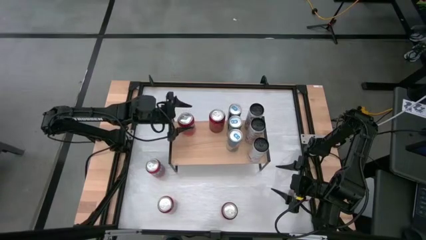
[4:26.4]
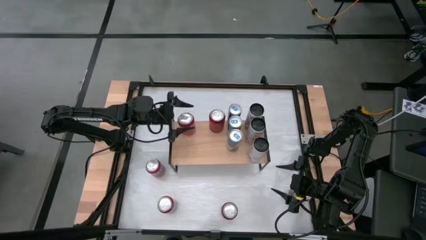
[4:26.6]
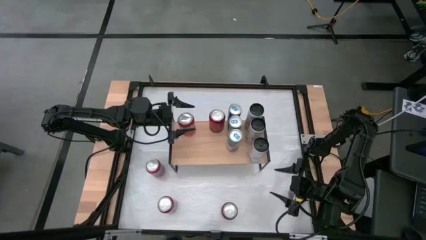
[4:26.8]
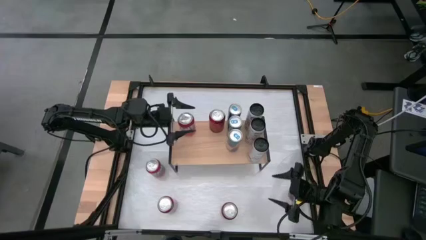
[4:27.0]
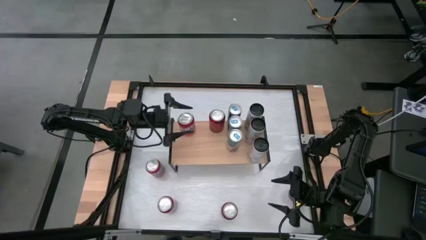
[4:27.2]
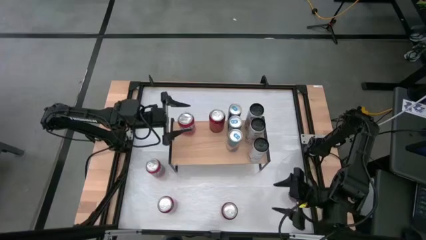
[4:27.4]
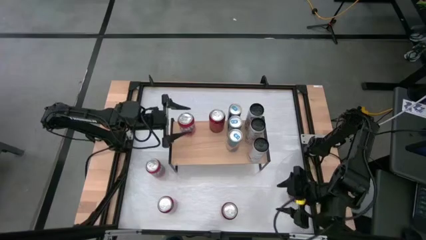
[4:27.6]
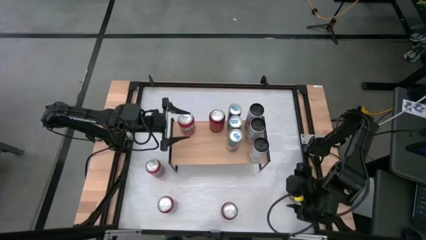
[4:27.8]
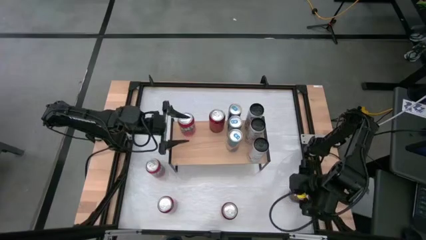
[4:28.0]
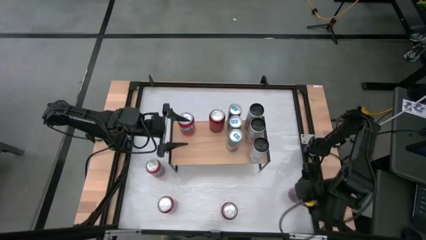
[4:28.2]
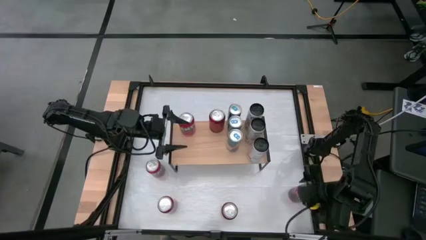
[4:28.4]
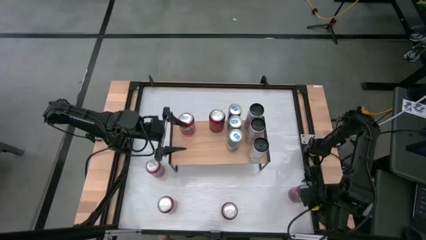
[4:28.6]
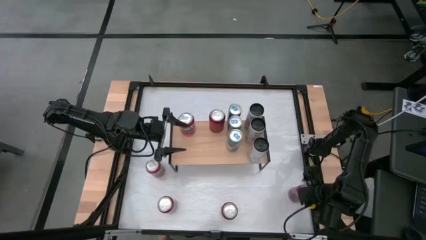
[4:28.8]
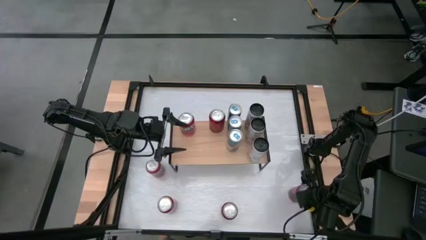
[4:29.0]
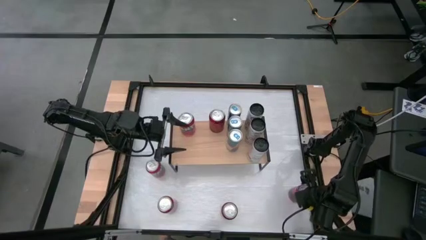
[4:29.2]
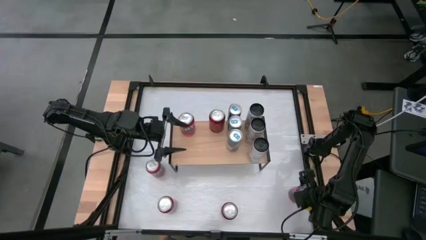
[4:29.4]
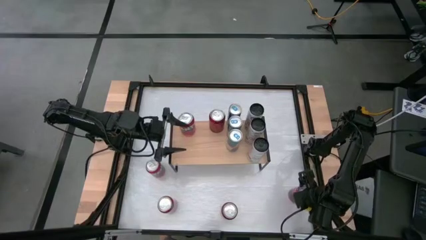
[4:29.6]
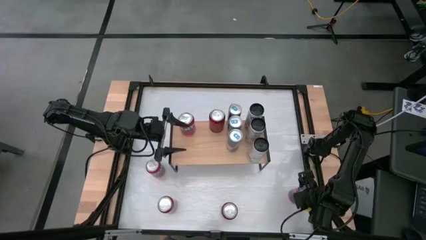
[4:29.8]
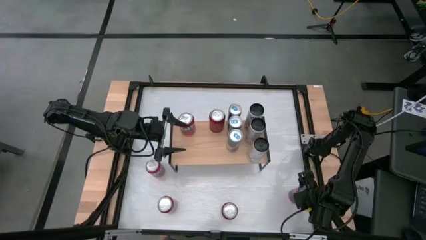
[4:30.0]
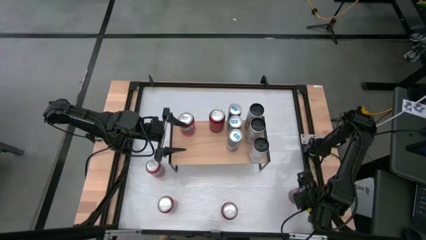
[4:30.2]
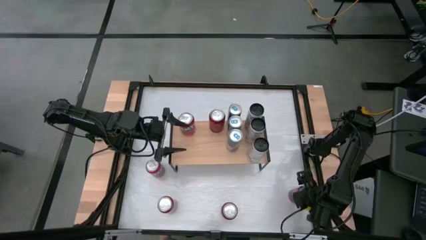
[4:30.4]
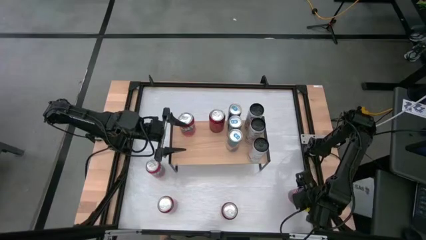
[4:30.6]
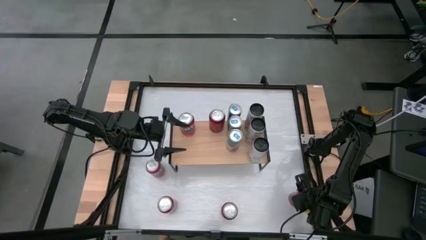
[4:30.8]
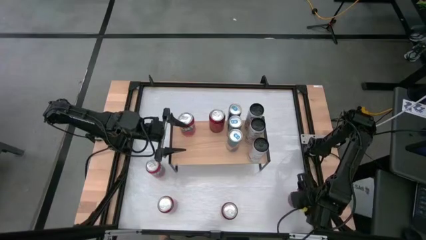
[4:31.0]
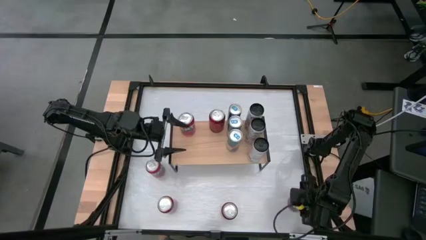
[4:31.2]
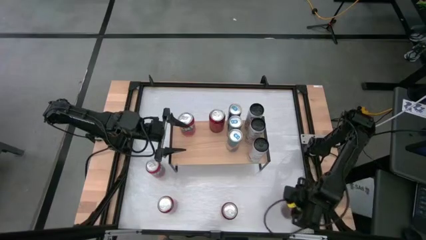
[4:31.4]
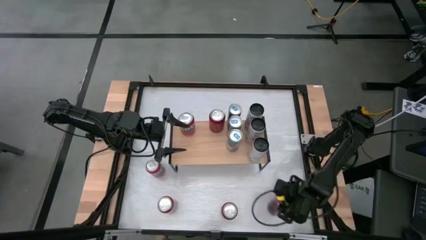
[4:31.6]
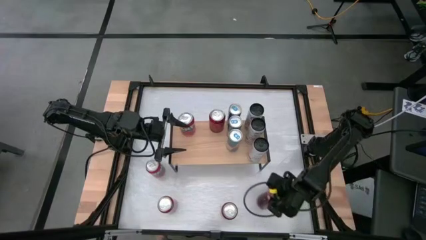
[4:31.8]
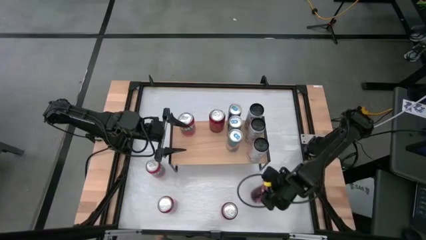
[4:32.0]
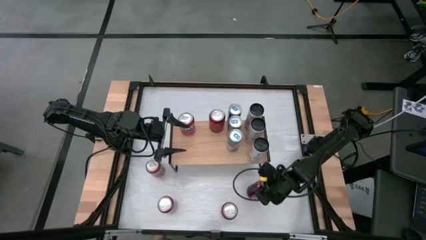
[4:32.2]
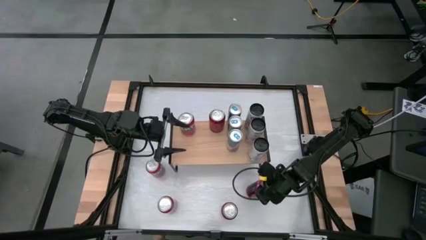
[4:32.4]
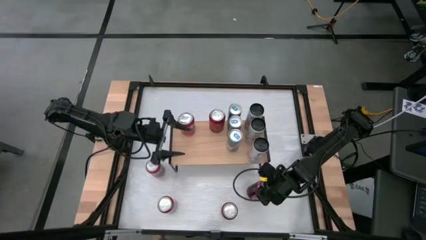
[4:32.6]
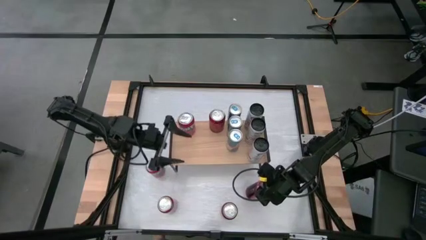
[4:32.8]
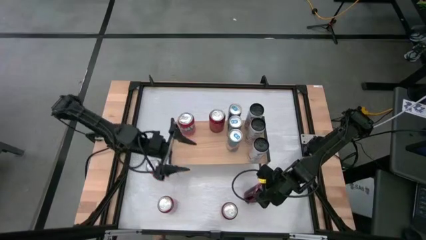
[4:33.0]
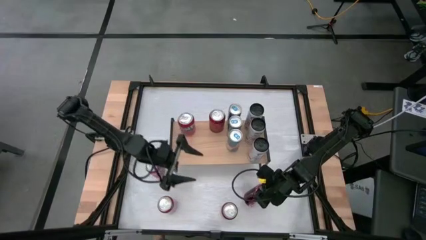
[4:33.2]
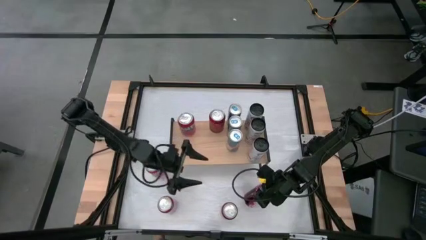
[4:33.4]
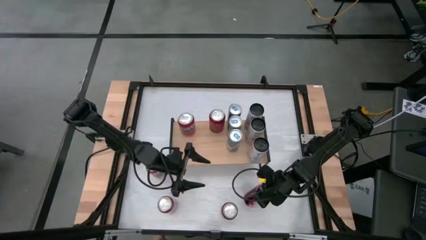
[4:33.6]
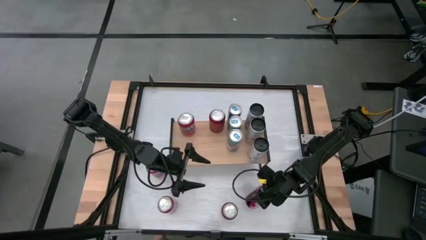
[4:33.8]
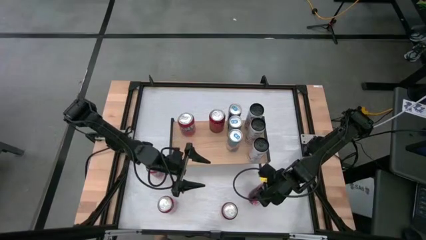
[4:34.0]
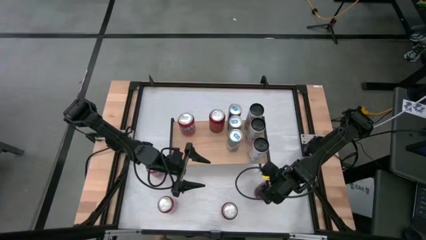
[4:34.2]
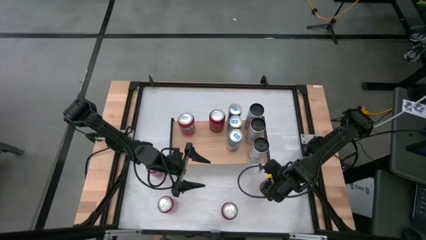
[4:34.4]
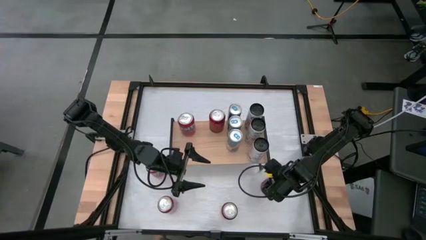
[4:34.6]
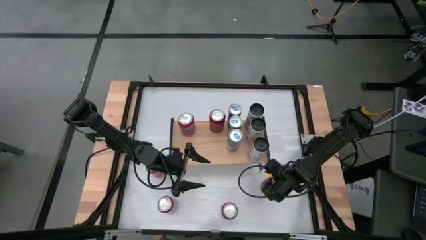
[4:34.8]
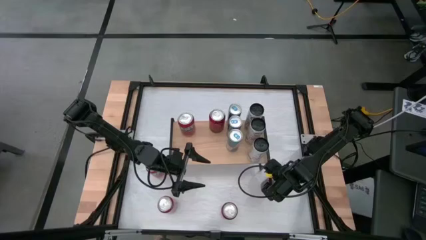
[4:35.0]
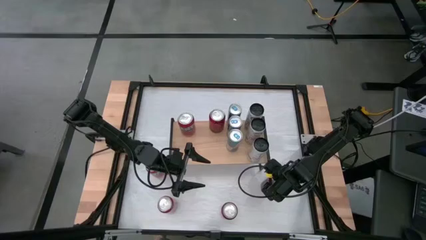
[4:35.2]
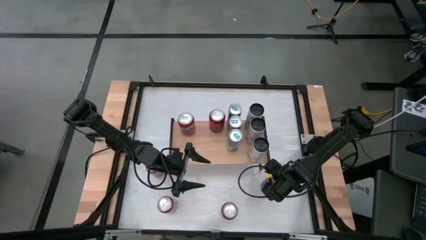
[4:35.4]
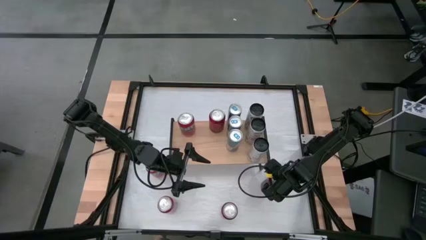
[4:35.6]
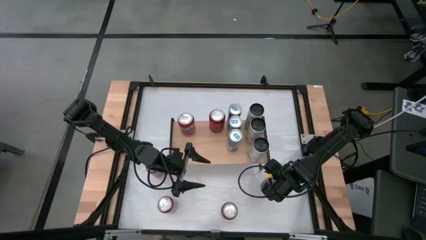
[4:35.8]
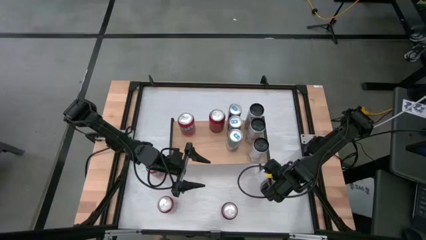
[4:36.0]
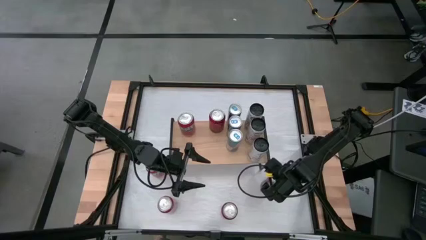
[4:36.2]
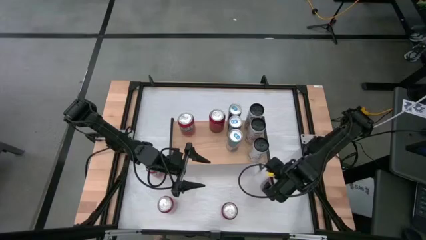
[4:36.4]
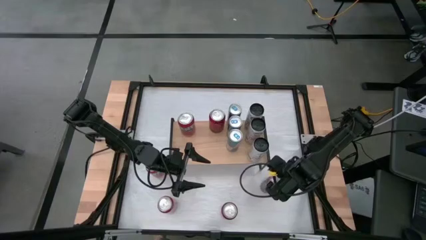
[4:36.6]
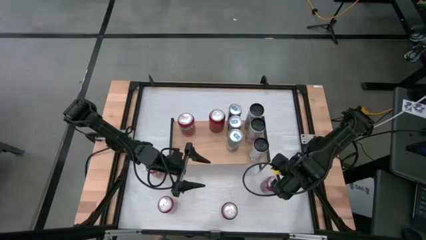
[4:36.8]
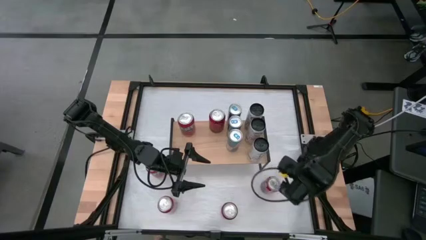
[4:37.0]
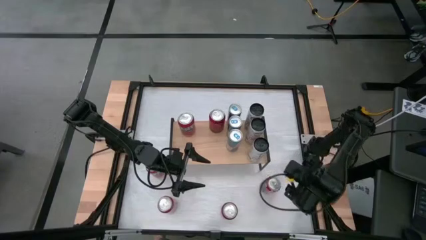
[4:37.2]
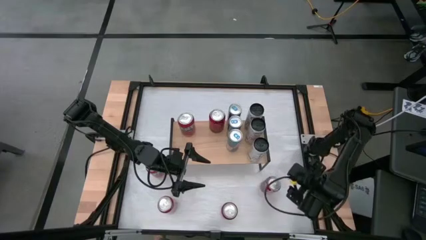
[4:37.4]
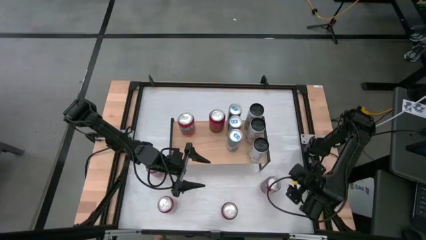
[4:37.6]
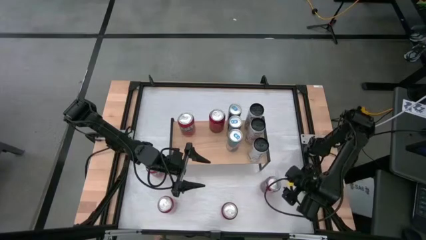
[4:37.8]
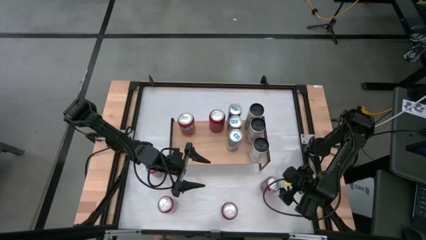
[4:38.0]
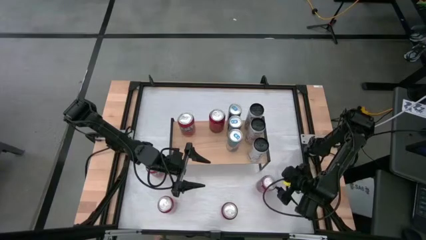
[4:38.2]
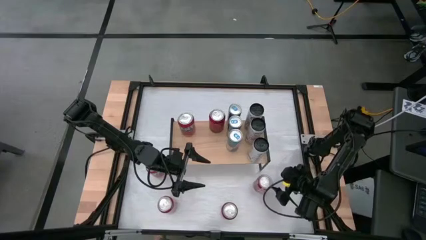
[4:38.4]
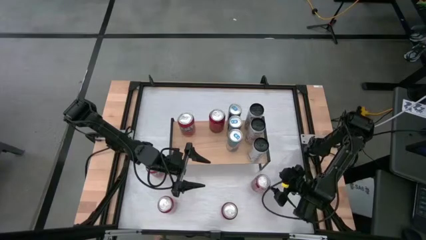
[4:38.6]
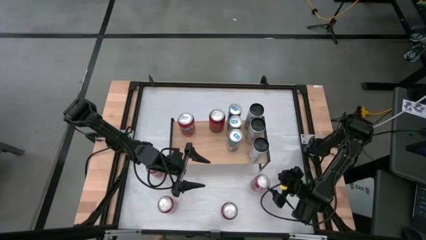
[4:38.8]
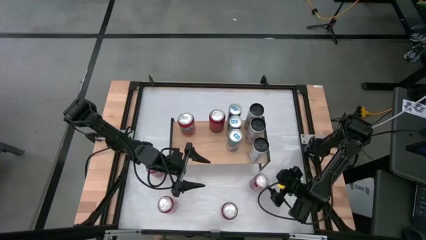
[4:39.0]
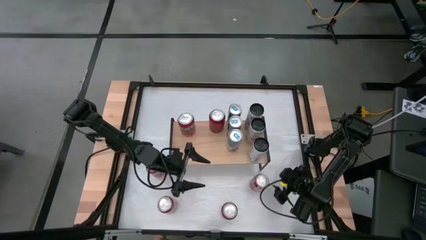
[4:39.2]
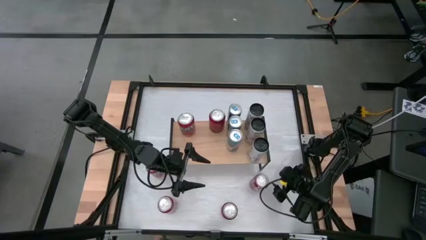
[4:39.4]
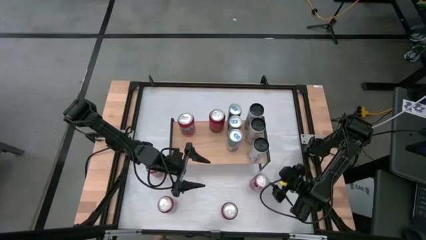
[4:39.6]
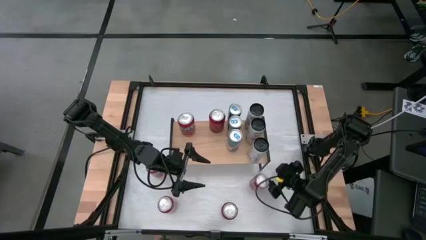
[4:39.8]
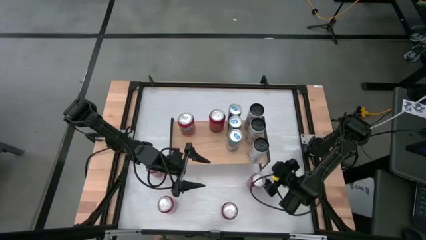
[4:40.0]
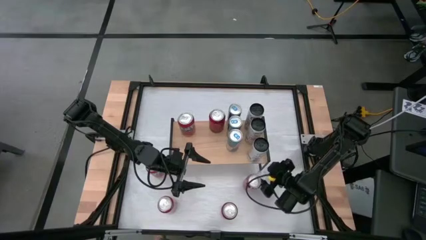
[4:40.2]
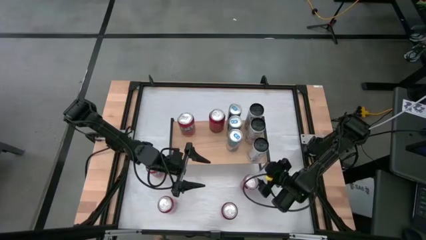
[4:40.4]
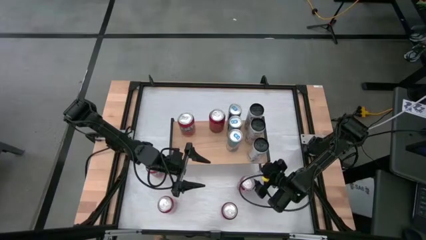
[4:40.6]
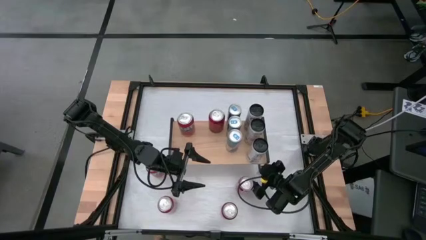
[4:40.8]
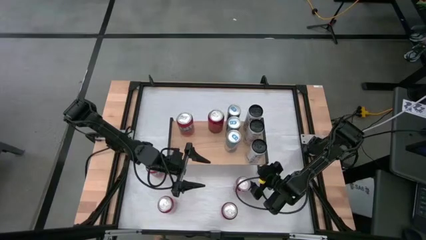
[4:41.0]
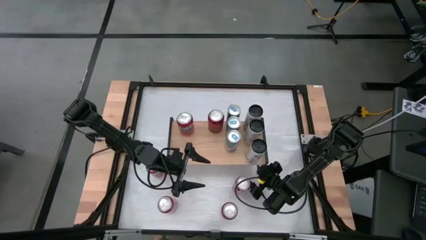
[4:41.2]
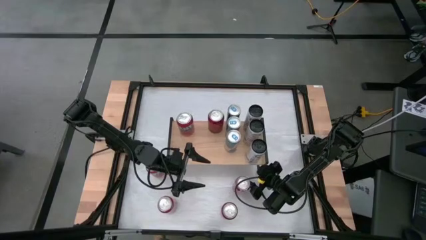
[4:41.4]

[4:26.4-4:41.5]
Task: Place canned beverage on shelf
Put the right red-black soda can on the shelf aligned with the other red-black soda can
